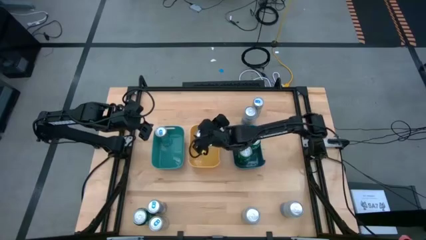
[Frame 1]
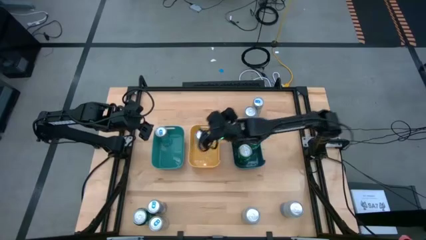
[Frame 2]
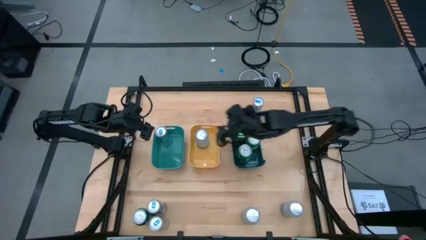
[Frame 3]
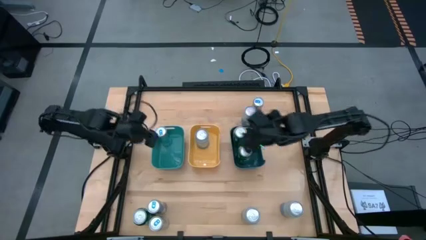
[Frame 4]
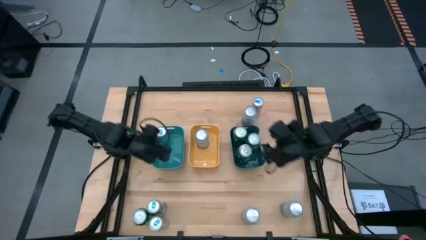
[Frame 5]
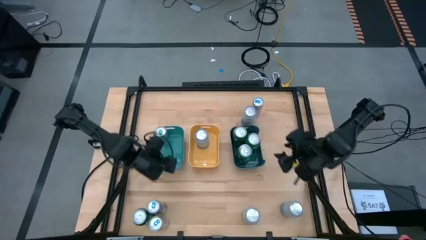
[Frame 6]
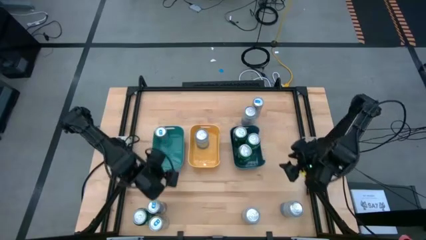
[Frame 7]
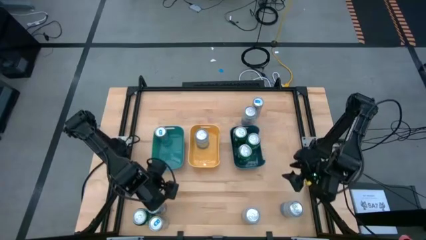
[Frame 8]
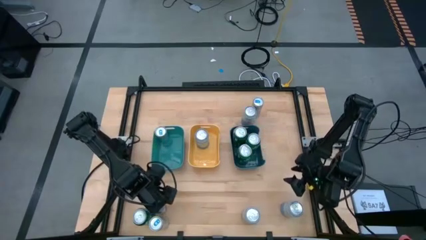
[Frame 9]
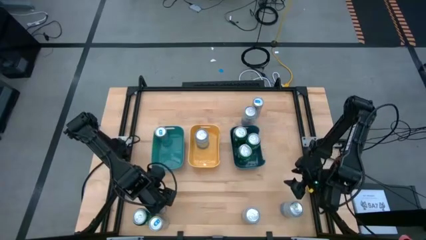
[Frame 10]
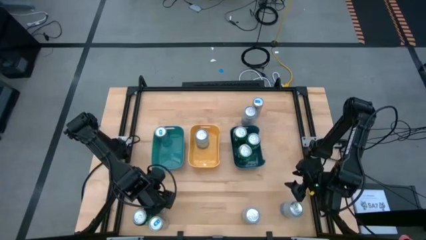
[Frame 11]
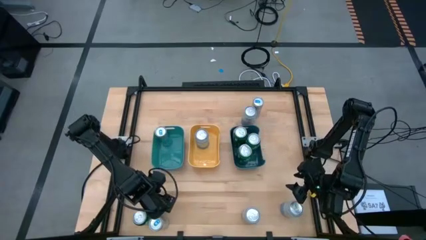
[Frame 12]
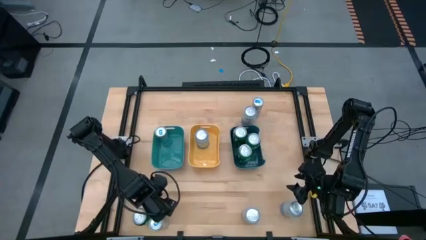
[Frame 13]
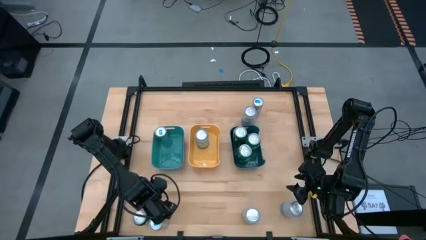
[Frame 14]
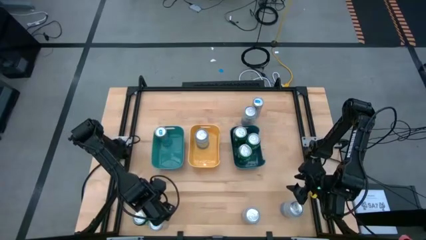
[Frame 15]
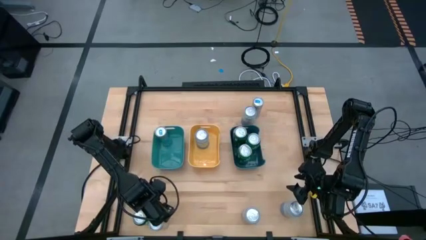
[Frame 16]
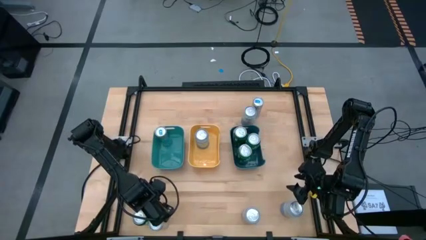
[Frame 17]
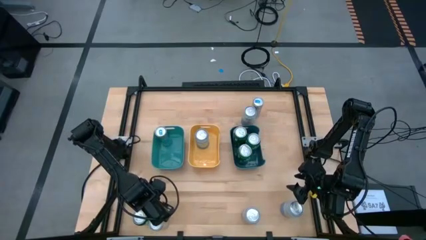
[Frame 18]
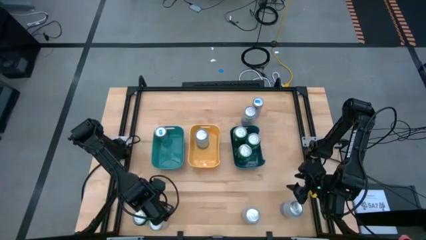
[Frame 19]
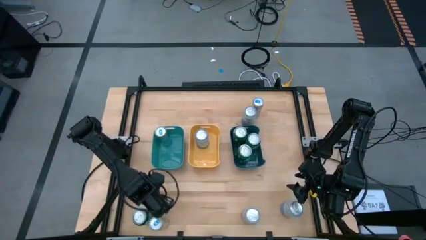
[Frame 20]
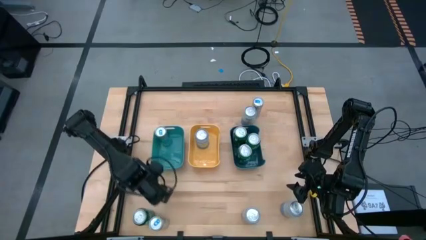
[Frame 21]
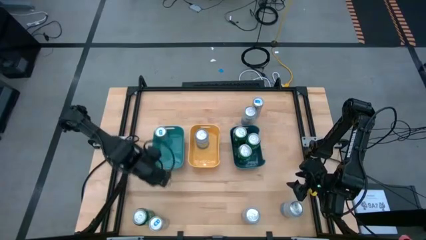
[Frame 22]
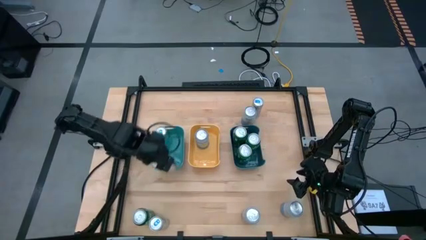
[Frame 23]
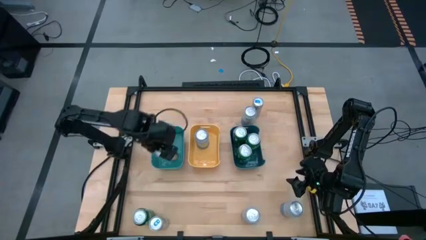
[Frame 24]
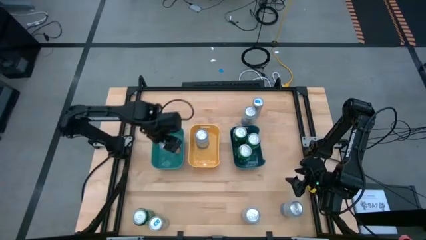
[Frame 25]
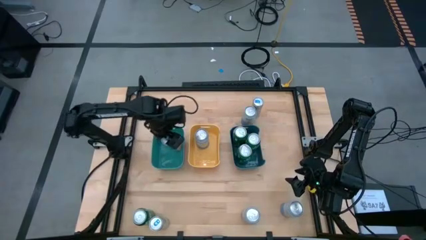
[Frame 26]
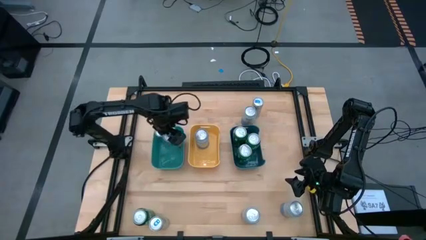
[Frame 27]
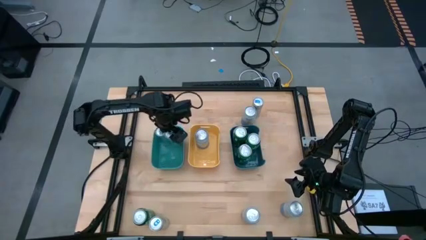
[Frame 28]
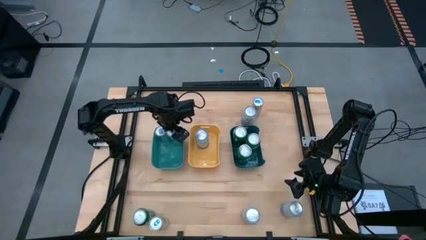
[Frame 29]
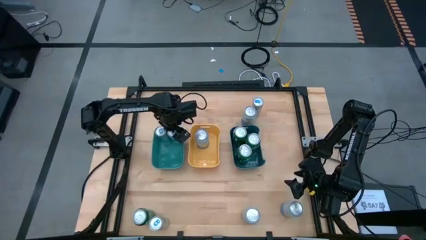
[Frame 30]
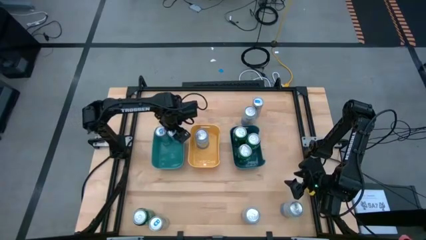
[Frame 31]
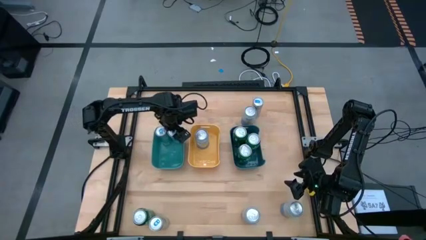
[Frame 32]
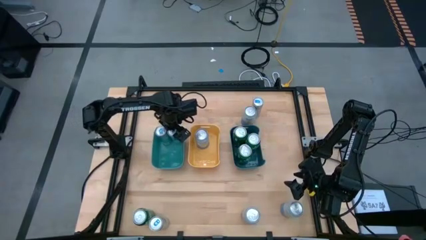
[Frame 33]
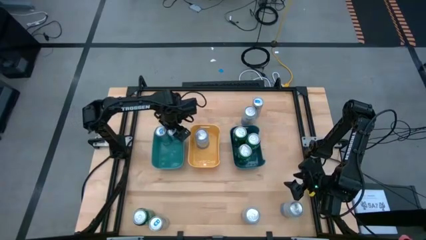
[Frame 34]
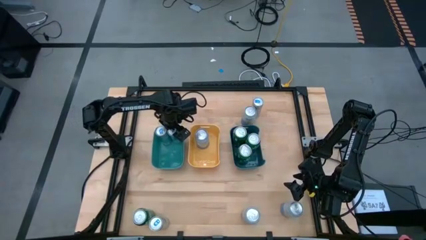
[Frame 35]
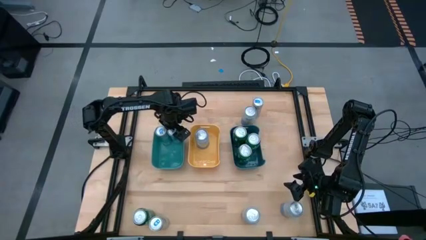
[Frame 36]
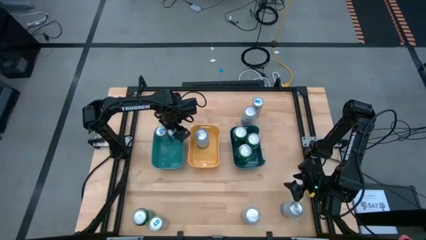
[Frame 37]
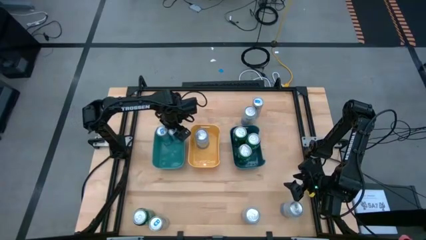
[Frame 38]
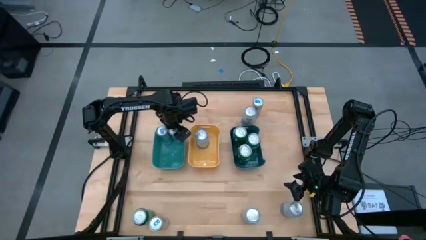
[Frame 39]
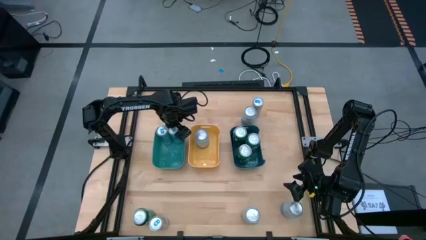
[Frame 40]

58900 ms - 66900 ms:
Task: Sort soda cans
Put the blue soda can into the green bin

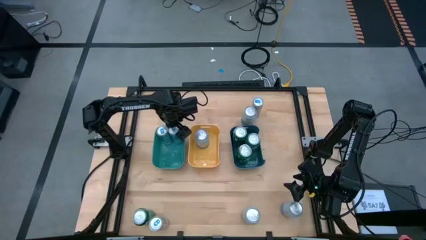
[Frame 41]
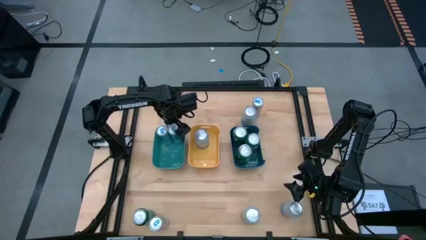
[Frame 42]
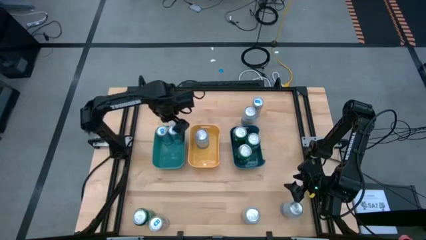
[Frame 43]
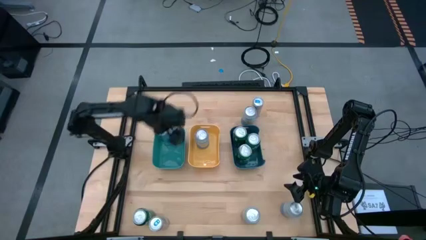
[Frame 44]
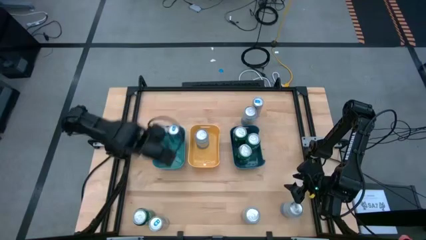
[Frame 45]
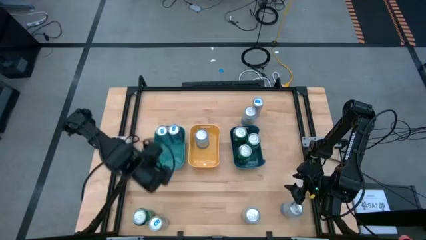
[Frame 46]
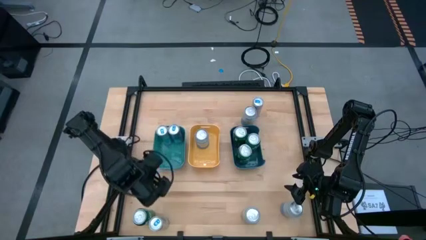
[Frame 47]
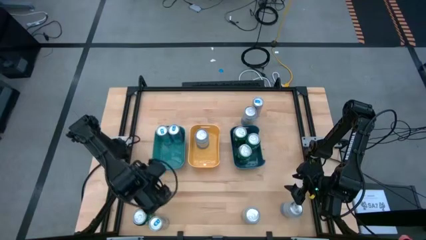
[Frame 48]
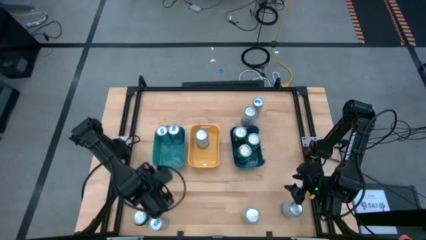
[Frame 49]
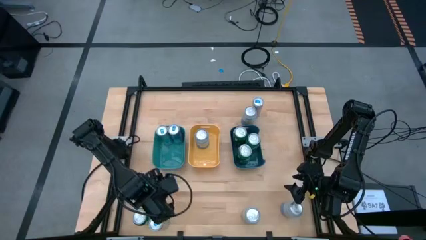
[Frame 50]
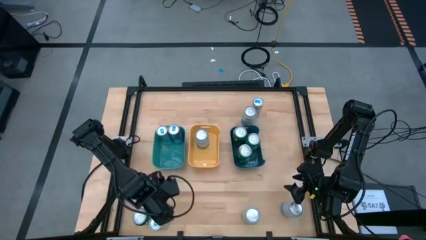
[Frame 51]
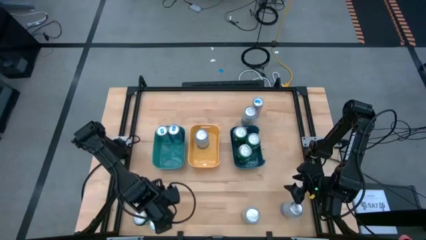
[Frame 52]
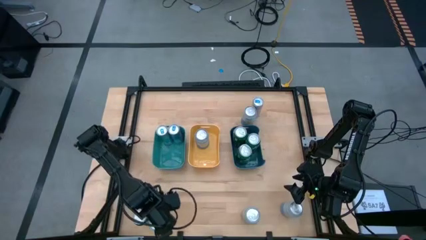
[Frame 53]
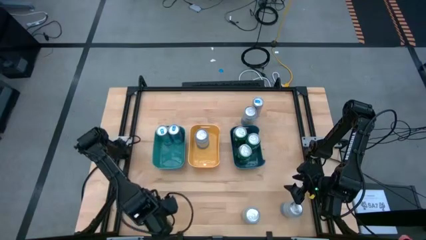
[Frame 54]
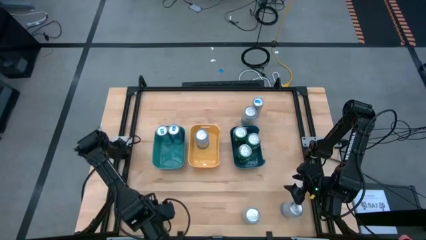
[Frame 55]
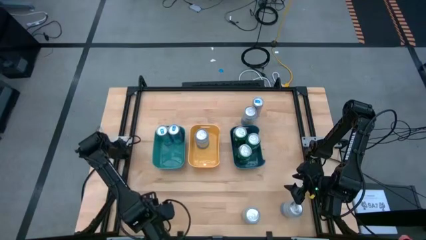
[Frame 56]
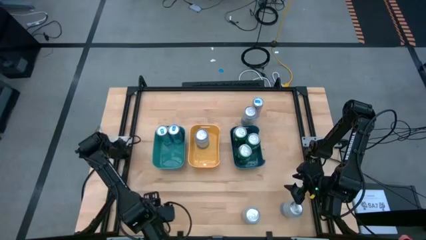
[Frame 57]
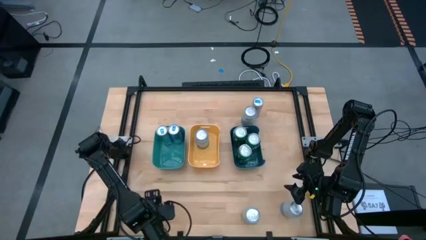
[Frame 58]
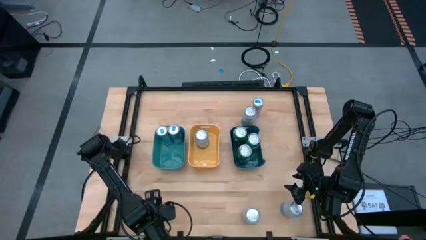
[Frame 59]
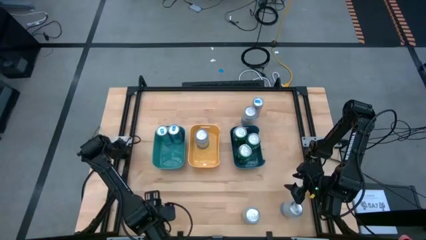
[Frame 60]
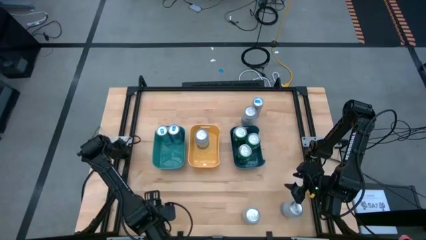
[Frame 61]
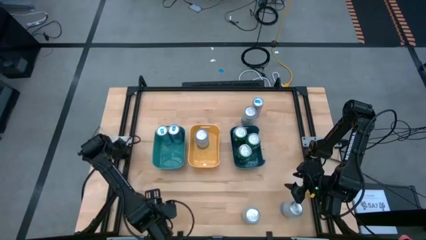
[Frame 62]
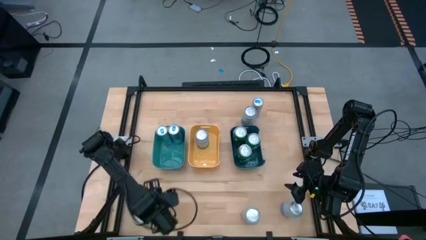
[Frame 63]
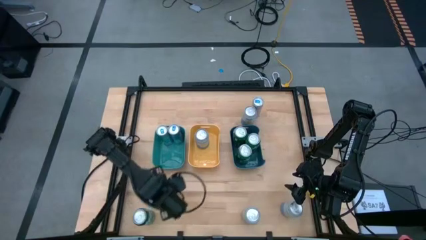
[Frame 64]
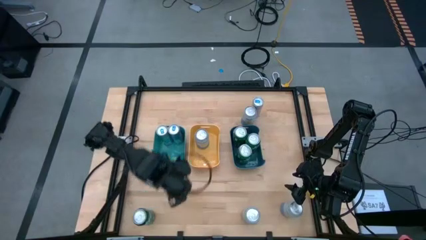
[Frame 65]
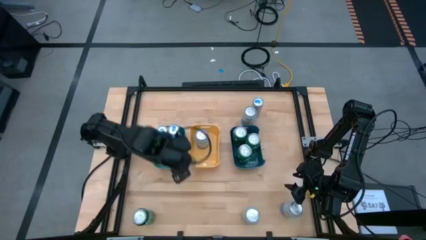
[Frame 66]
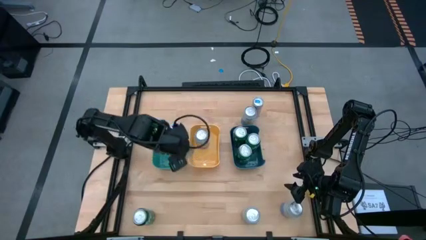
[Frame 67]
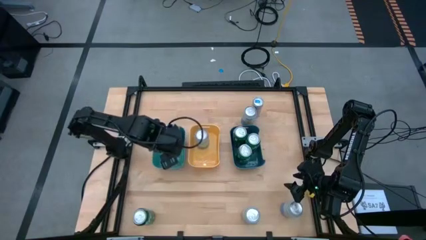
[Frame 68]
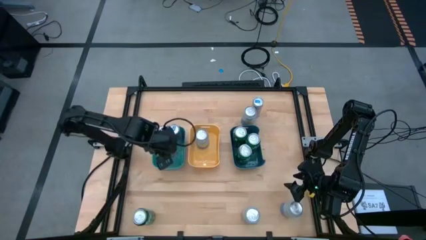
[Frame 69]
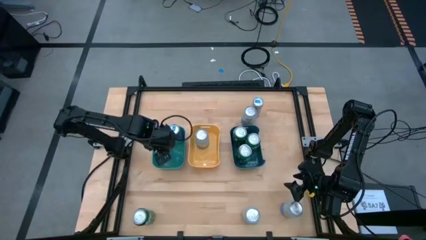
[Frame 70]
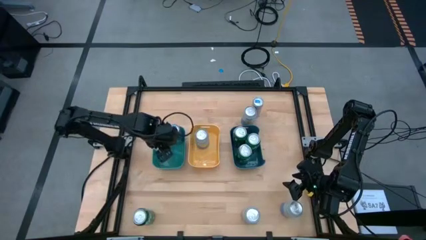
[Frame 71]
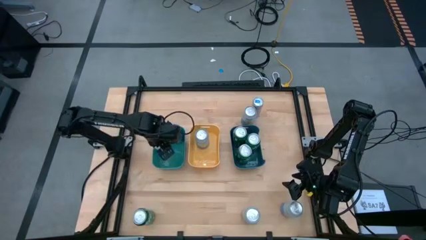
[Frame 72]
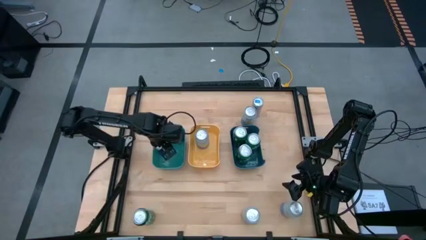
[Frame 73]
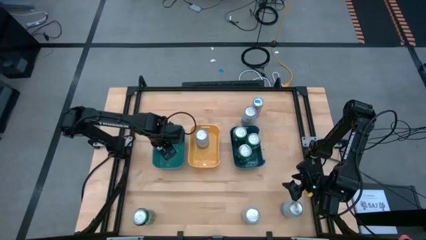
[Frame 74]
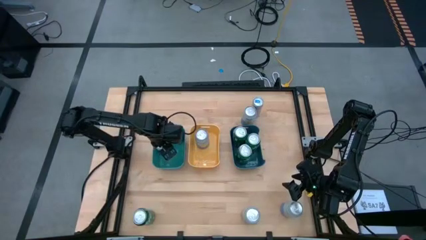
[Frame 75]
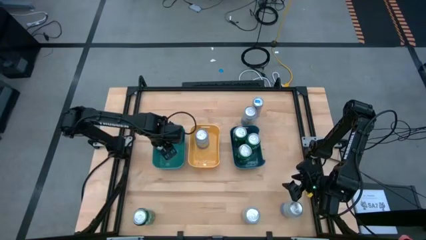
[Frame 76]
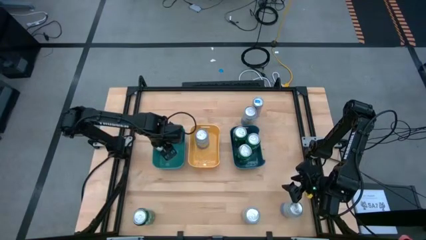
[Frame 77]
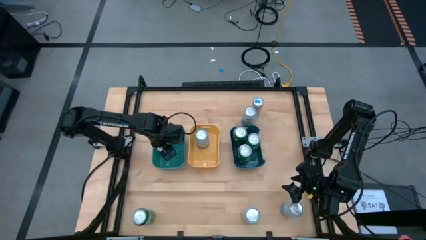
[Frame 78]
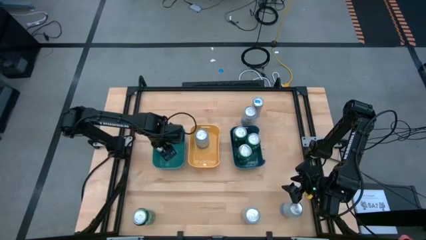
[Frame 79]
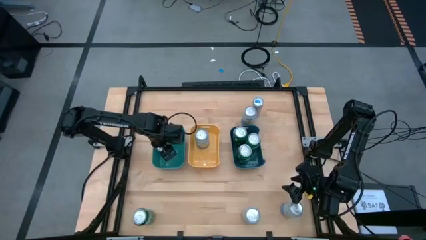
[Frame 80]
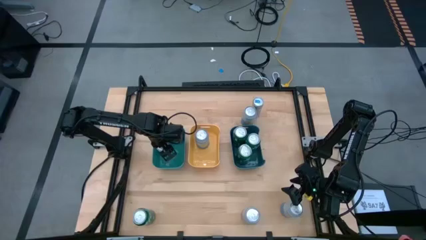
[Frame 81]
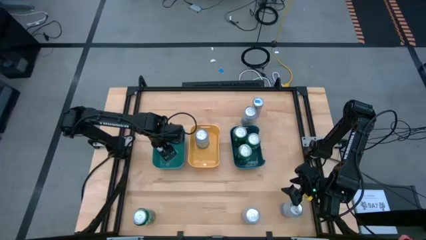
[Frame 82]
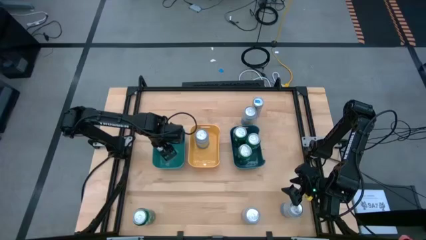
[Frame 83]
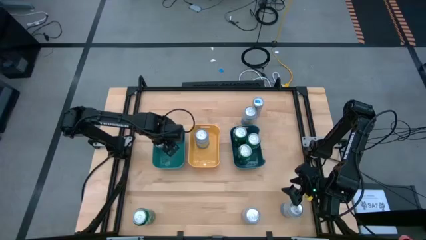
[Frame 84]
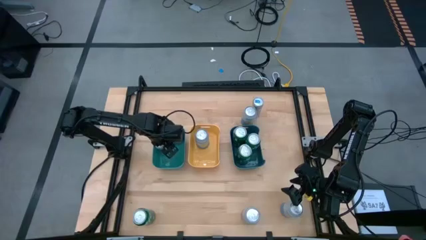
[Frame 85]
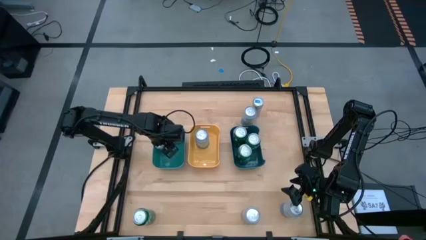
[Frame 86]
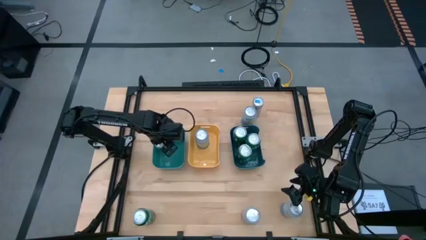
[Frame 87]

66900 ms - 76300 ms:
Put the blue soda can into the green bin
